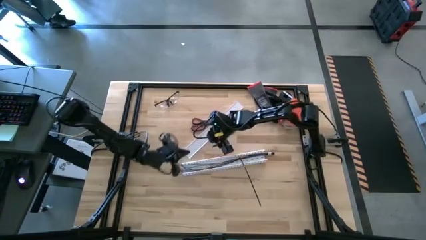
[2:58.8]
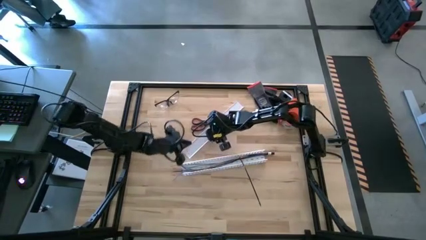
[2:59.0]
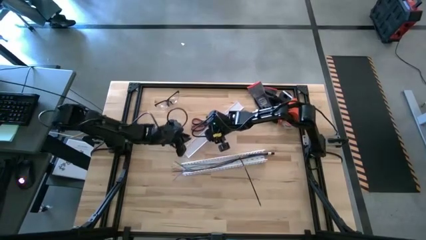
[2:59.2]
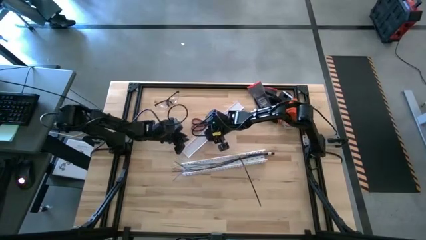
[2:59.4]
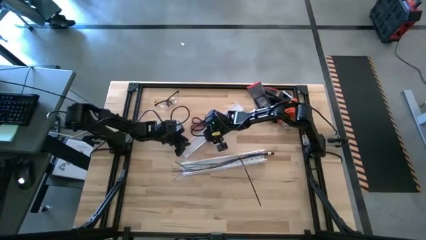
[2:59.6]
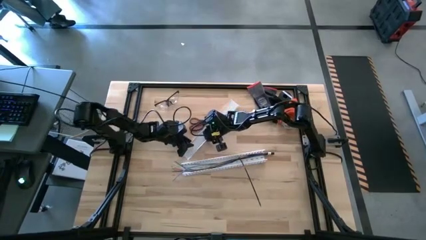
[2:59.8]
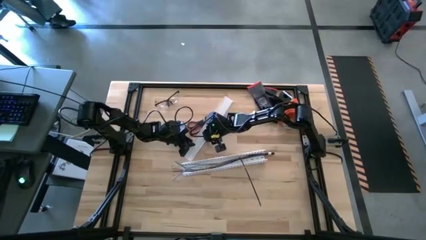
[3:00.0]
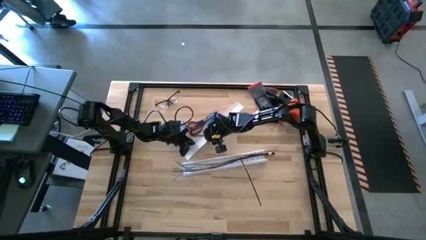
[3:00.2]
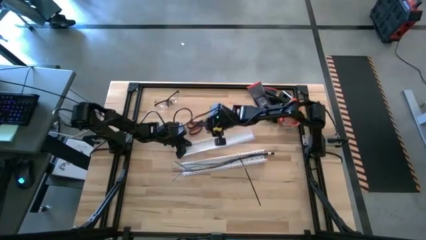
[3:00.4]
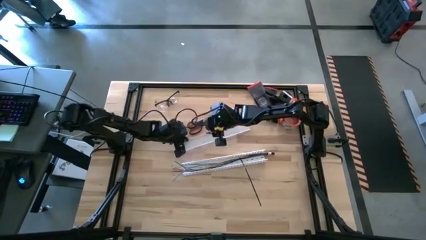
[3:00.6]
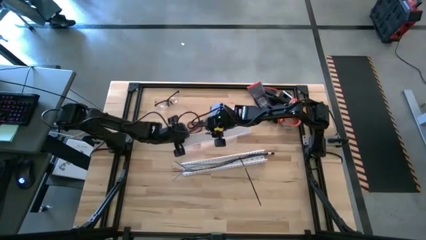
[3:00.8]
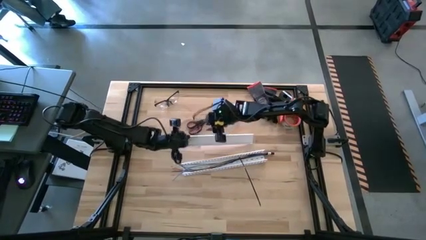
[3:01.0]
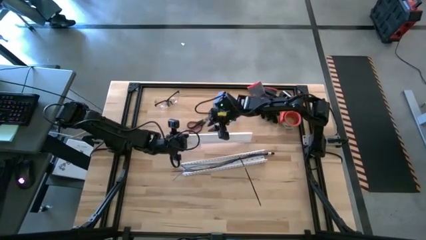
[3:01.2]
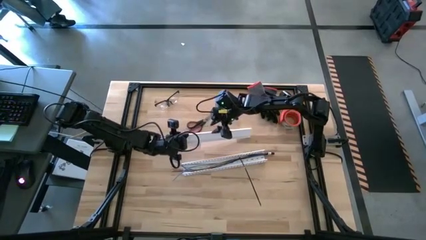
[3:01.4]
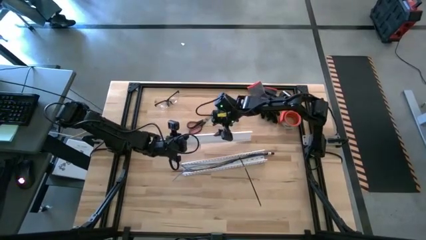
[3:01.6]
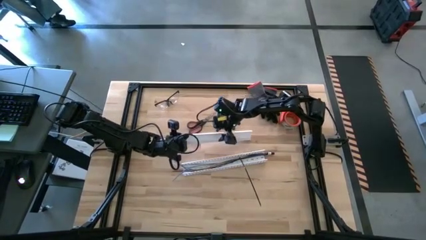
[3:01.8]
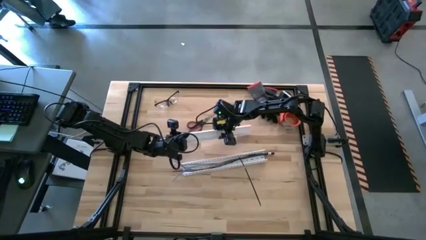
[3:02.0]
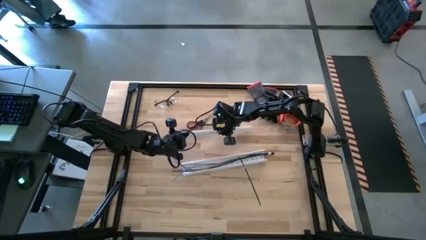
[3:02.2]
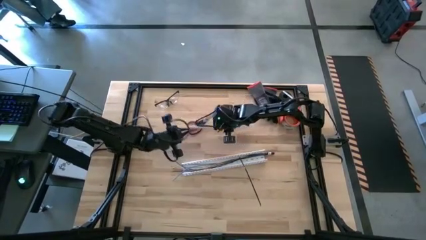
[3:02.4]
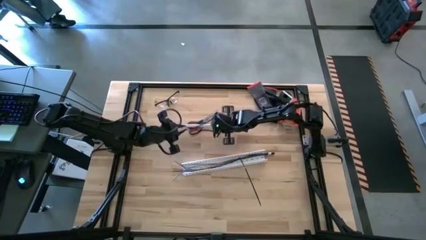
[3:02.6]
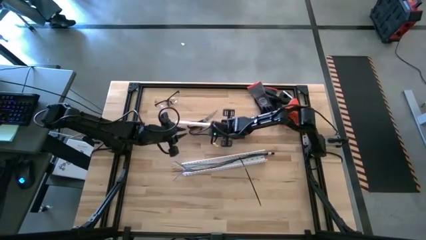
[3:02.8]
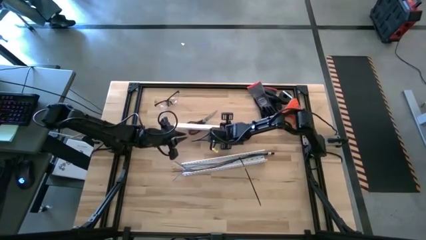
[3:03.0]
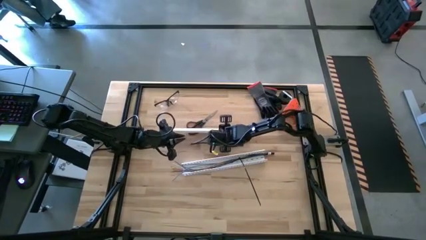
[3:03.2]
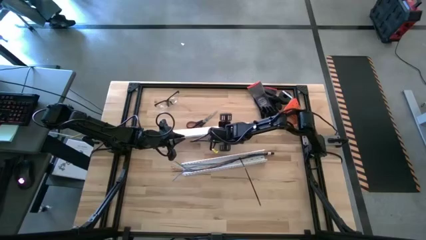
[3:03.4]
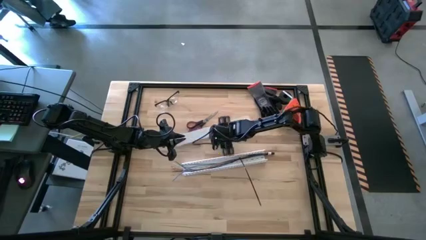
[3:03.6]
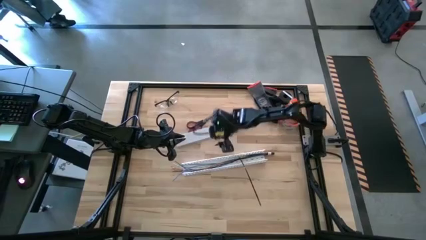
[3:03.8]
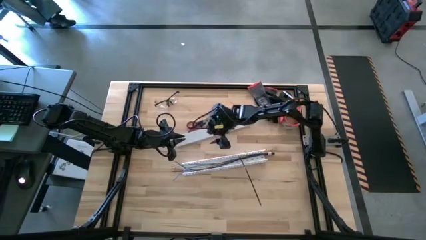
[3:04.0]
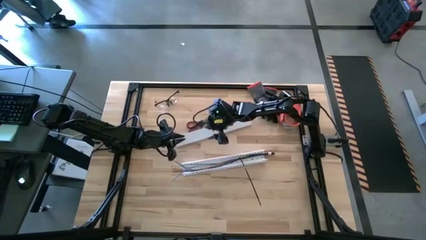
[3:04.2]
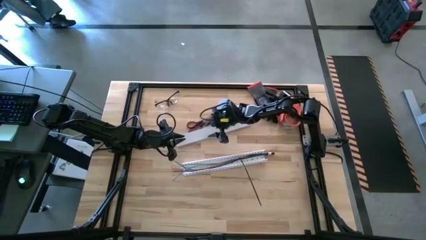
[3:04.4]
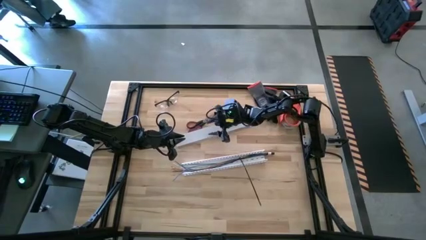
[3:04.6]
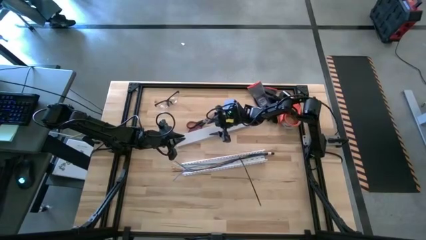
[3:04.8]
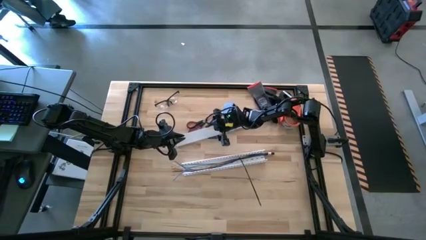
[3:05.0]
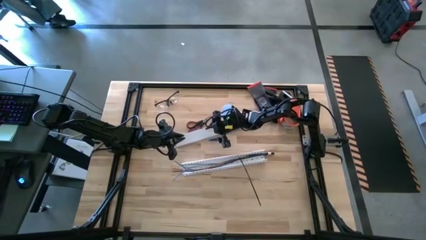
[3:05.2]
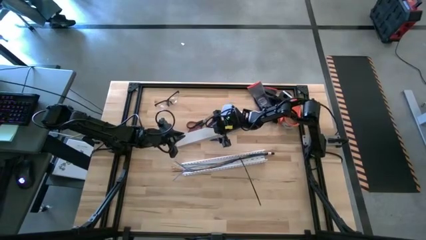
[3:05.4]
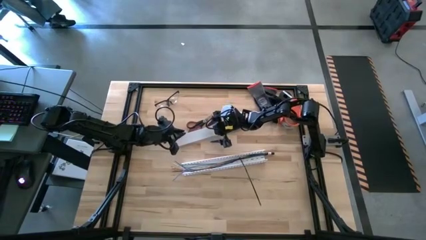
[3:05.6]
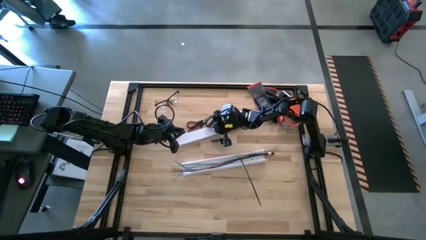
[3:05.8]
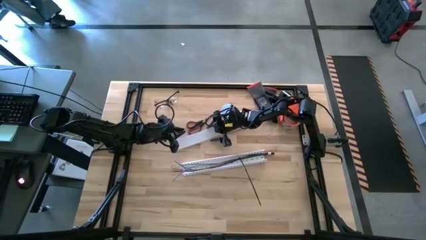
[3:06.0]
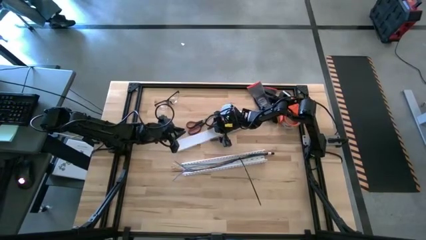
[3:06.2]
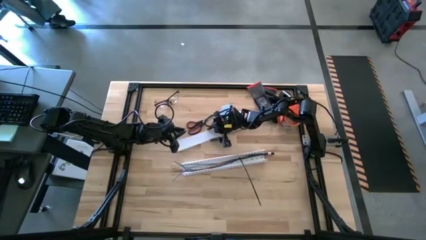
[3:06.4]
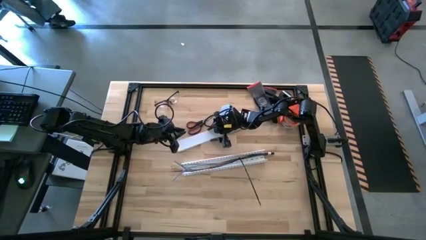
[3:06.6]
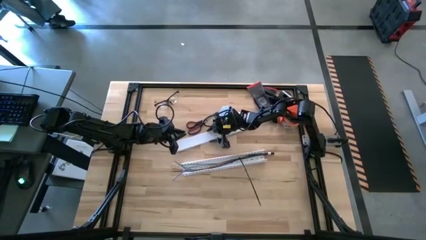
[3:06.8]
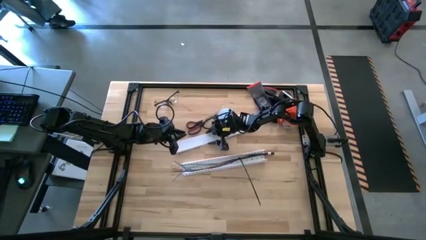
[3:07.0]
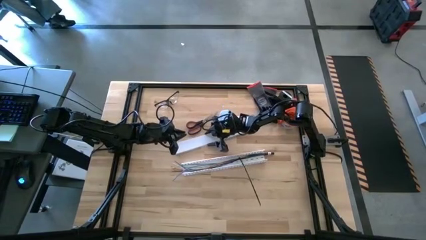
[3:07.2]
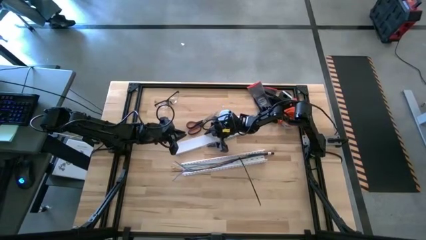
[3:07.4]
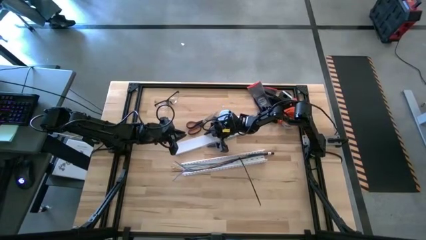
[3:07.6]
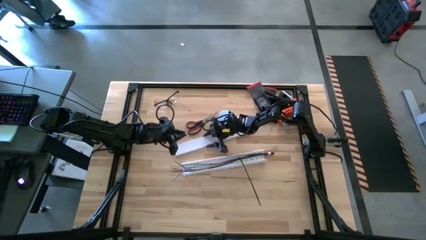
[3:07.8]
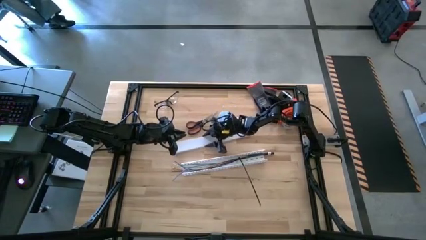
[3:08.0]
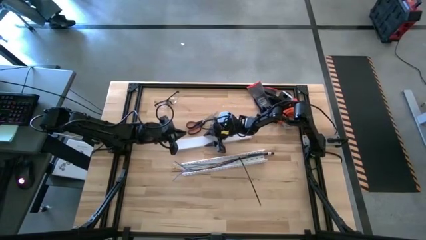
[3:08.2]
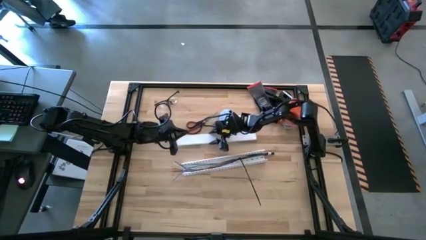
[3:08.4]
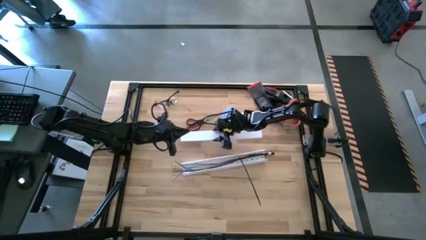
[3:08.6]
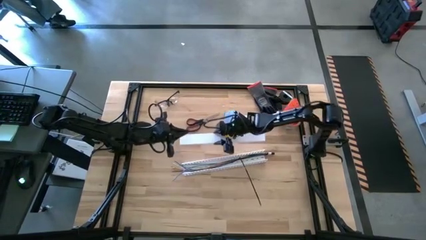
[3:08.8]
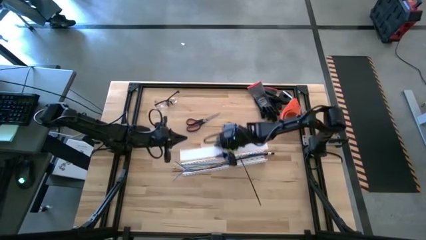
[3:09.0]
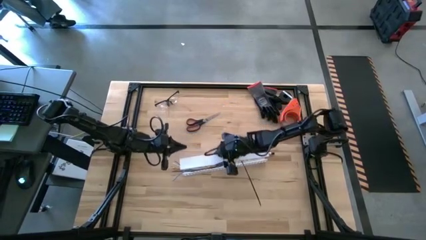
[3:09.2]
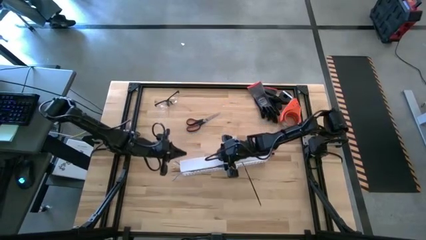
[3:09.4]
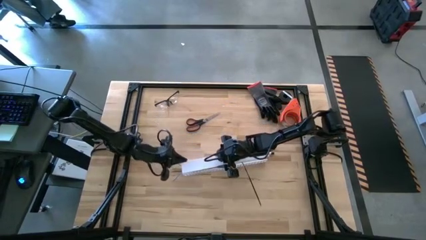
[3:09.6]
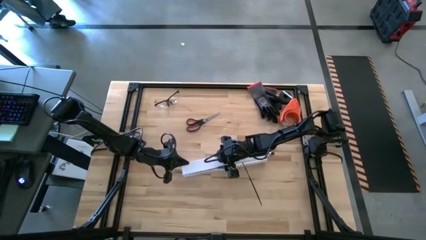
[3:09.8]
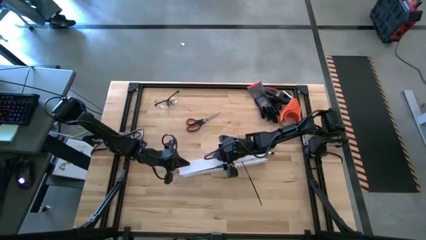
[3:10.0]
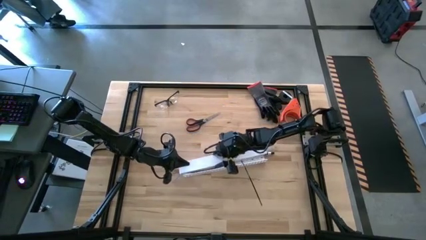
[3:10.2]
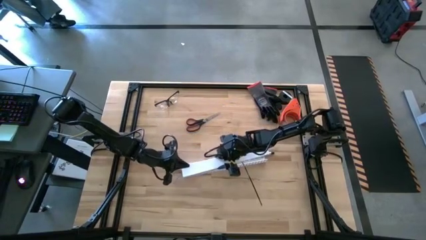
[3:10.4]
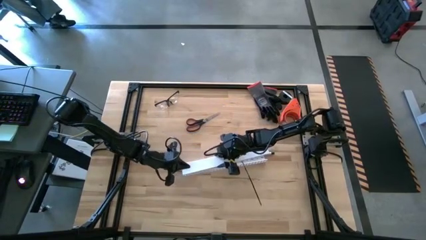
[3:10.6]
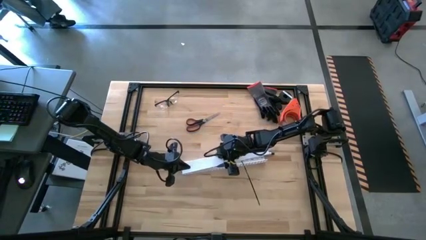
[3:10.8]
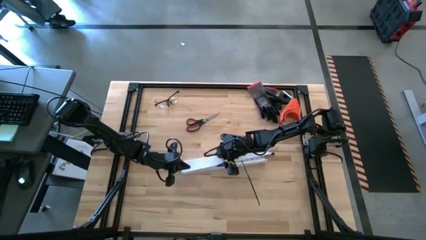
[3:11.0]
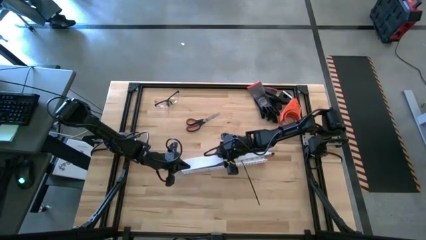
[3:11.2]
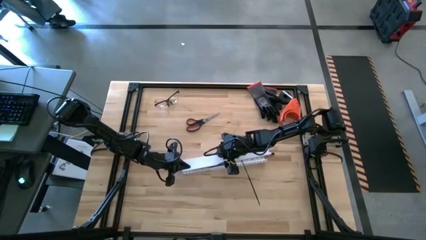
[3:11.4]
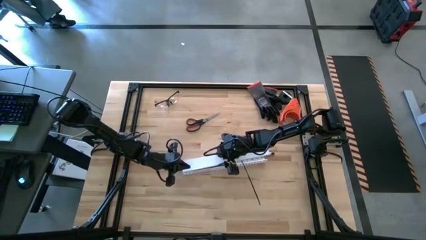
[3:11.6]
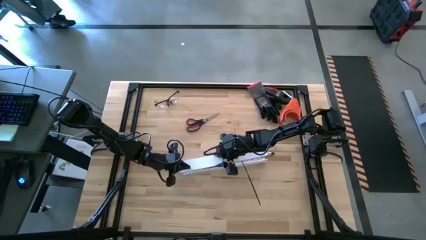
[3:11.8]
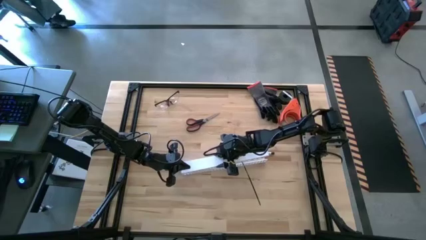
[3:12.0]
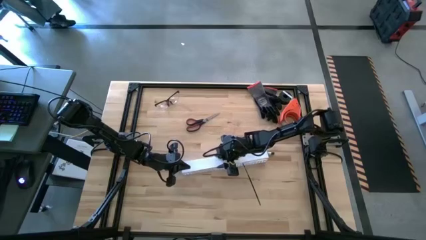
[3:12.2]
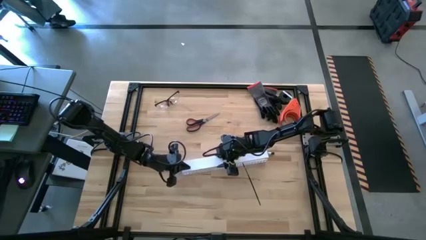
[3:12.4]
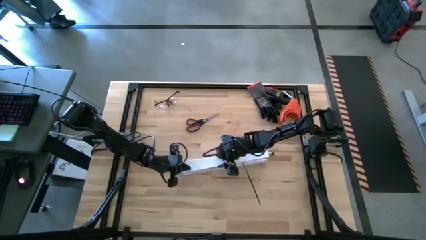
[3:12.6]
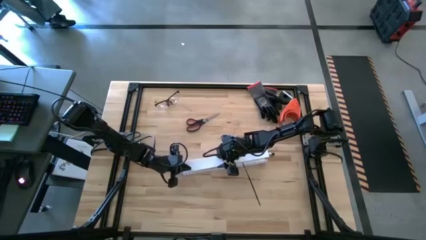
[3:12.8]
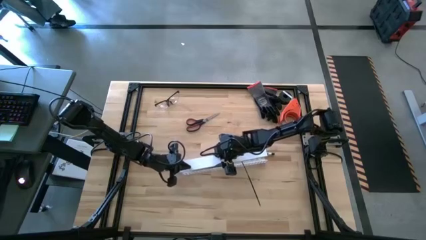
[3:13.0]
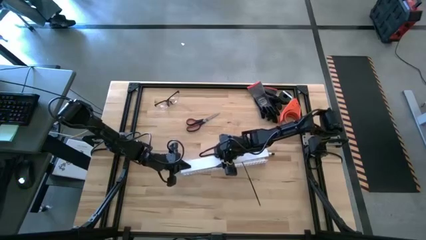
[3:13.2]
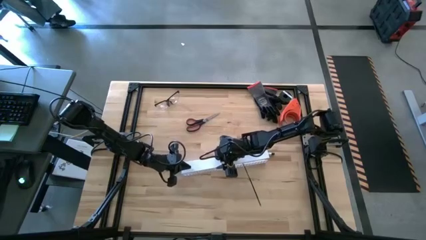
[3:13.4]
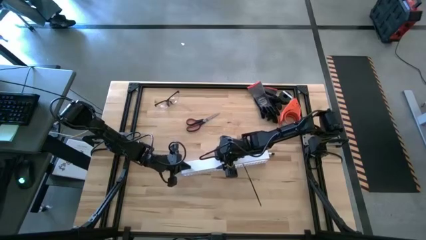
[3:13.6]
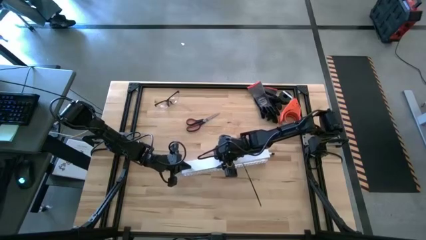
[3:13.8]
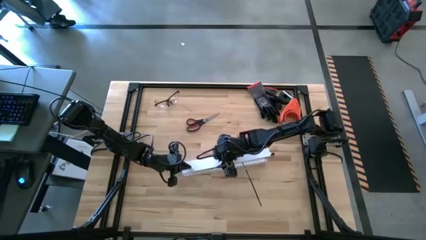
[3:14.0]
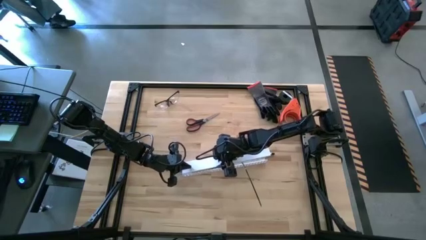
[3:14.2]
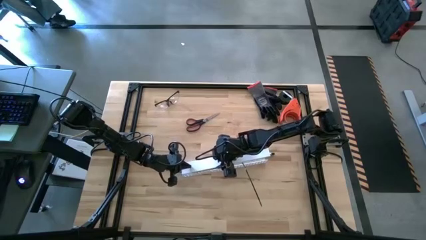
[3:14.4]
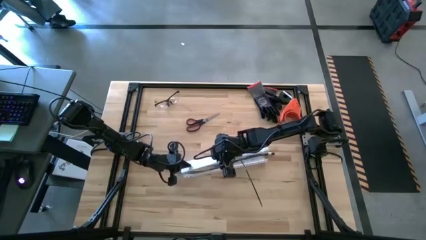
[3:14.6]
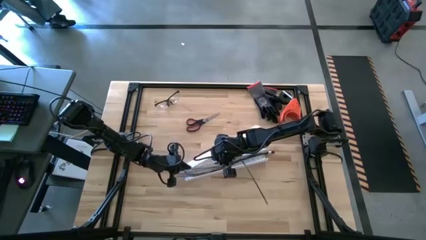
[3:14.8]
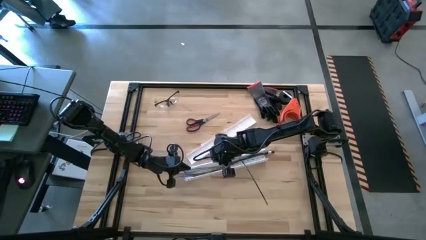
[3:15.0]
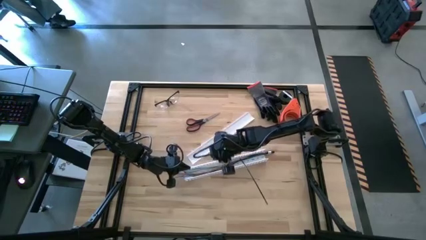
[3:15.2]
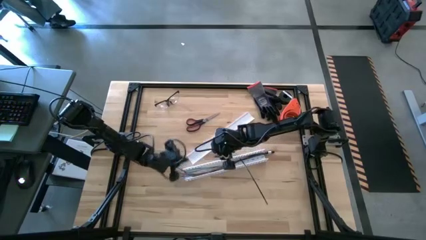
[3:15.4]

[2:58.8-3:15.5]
Task: Ziptie cables
Close the white cable duct lid
